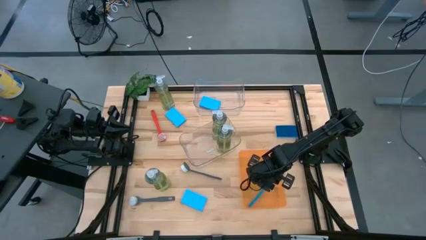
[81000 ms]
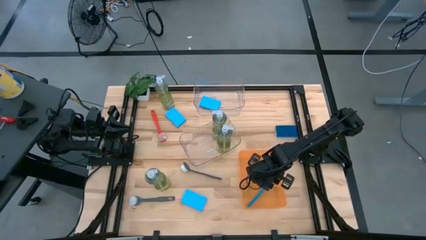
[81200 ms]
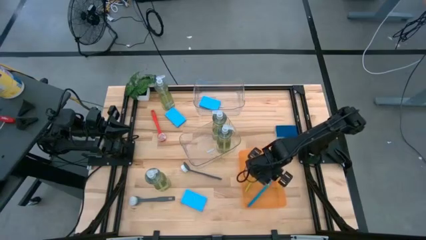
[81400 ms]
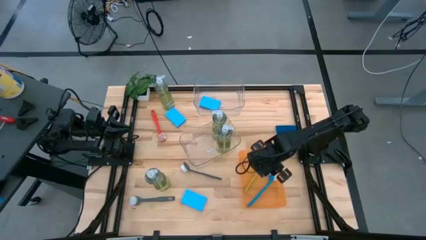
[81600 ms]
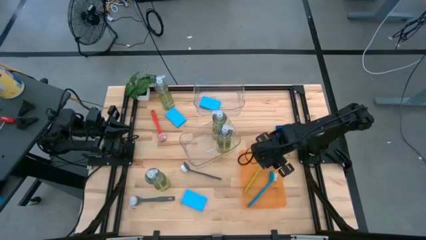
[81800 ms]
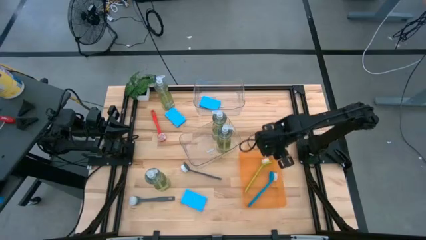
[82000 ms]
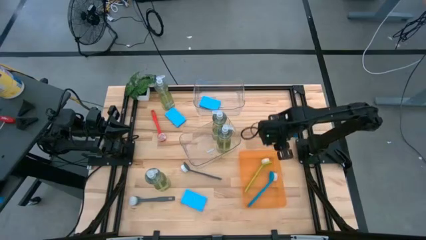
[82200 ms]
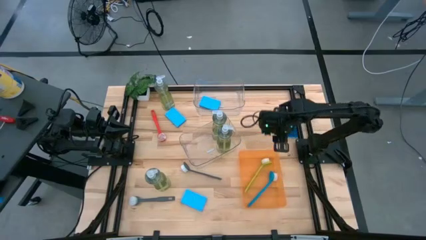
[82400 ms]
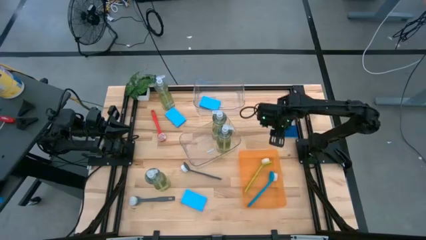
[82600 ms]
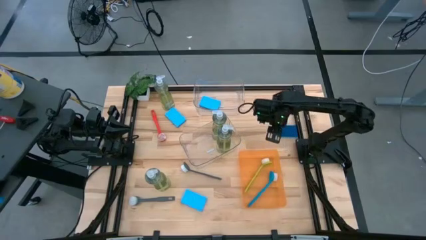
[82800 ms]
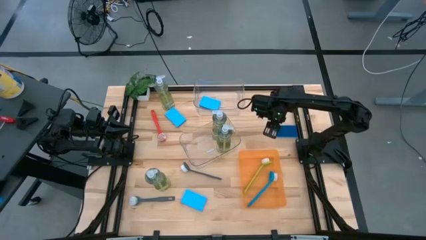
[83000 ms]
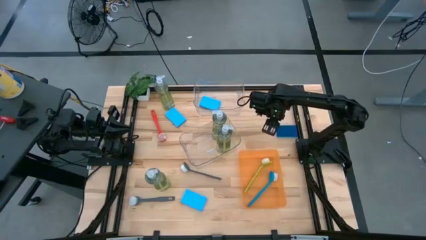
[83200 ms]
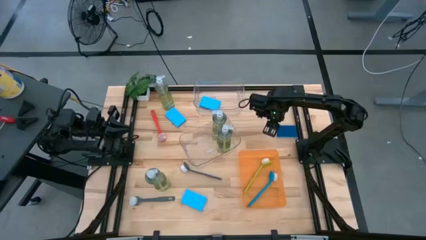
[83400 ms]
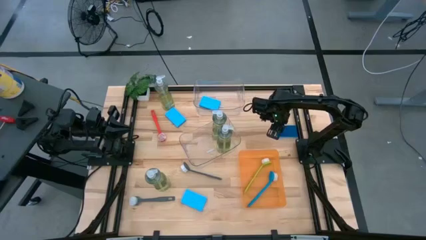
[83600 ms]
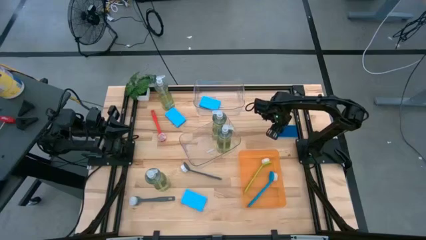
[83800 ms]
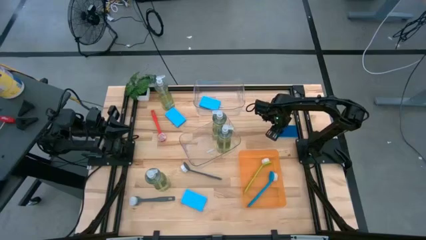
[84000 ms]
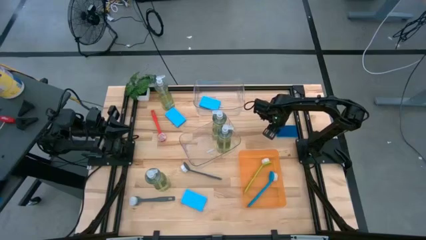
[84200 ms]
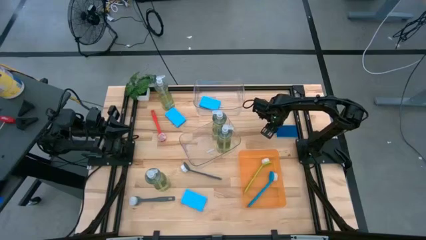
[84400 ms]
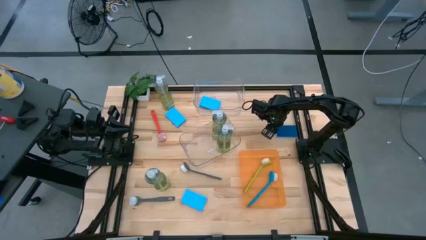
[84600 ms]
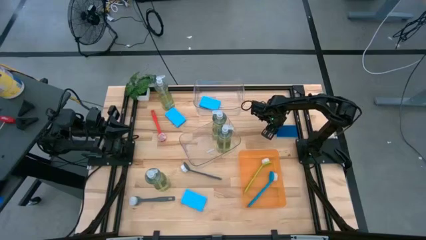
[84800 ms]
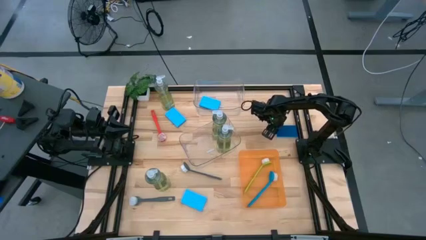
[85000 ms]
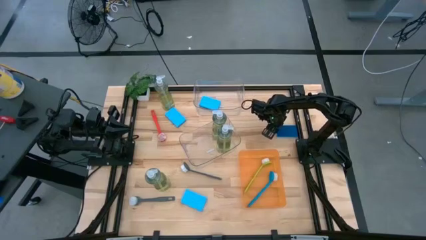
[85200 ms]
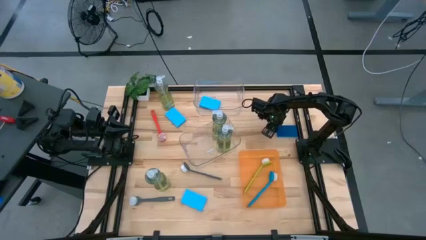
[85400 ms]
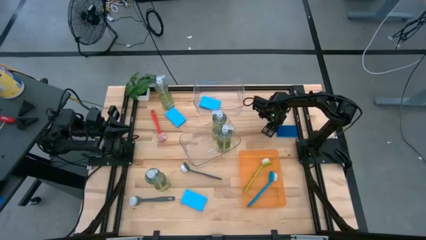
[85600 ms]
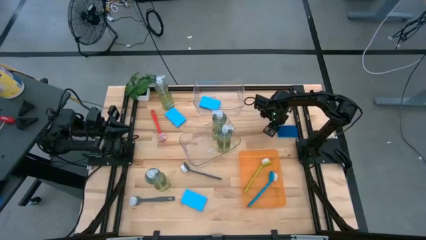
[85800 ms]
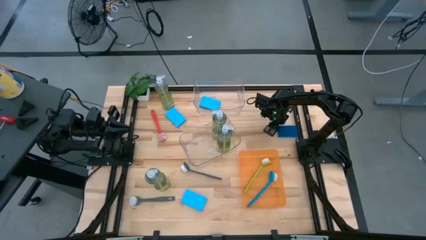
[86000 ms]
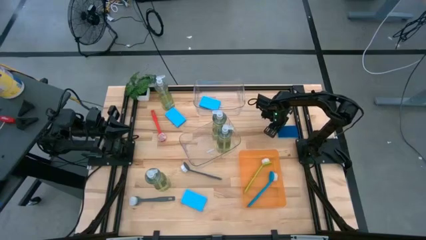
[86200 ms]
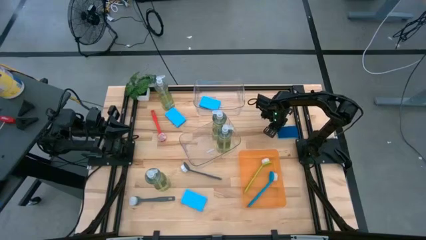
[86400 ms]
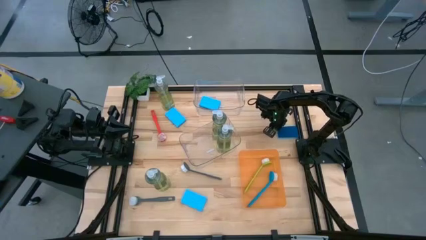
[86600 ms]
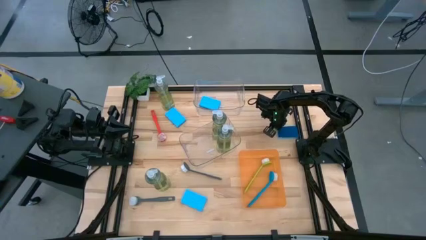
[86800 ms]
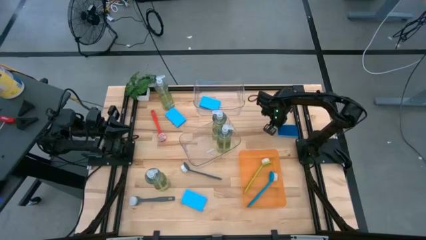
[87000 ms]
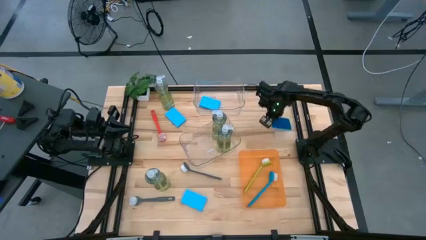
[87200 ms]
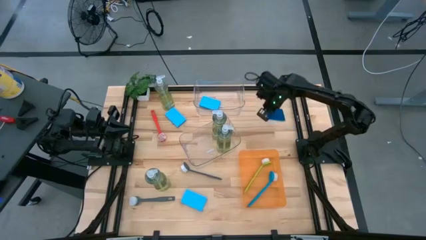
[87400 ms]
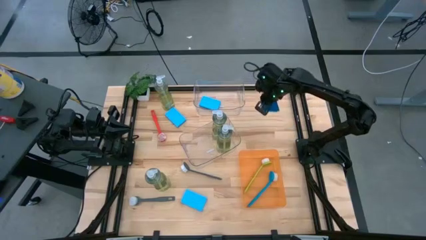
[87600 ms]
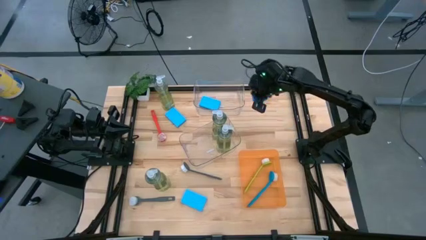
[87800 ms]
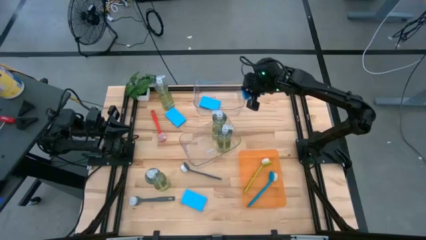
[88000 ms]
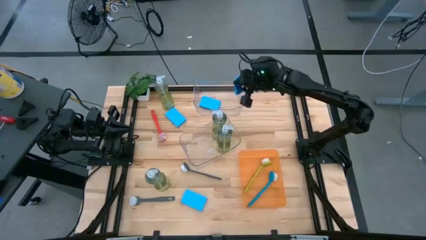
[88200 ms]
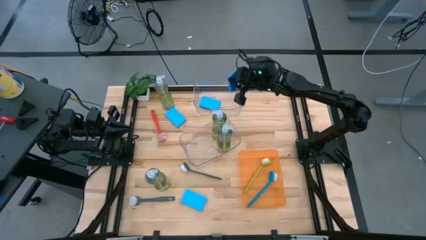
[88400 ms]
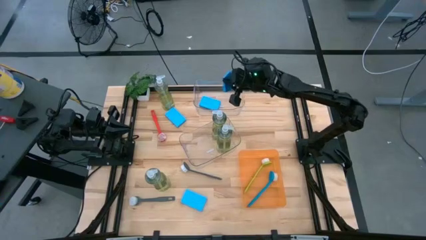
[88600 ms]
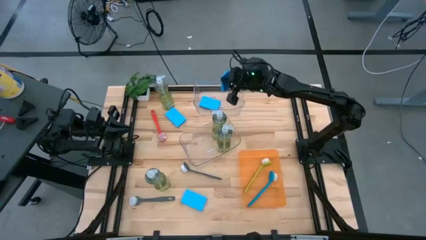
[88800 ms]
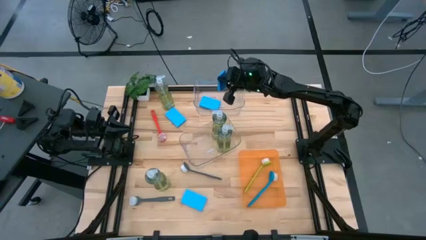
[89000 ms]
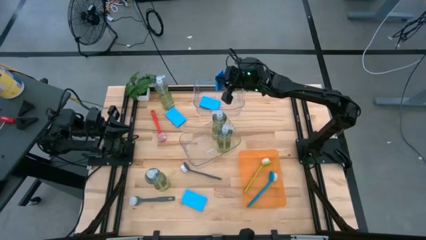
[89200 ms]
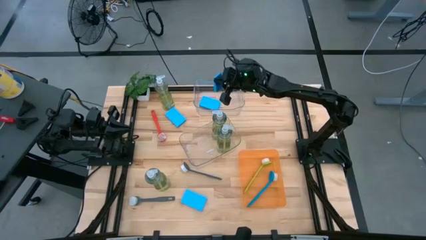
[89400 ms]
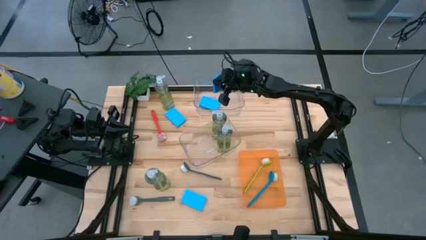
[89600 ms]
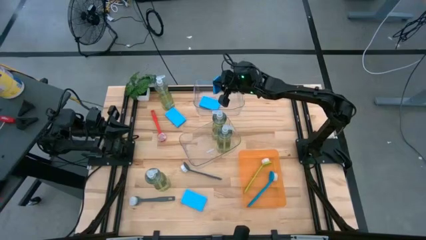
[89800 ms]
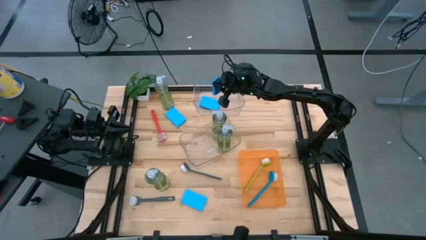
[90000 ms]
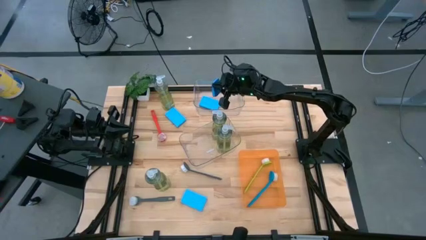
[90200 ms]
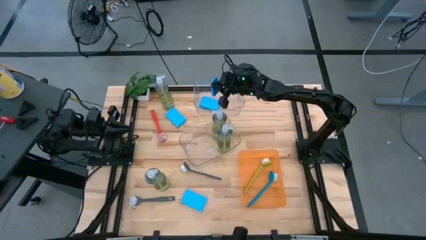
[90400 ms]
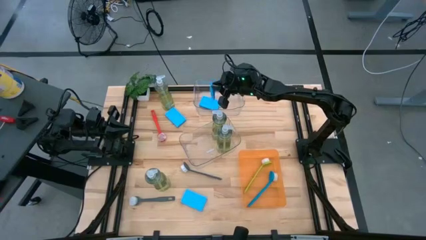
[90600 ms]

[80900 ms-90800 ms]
Task: Pick & Place Kitchen Sink Supplies
Put the blue sponge into the top transparent bin

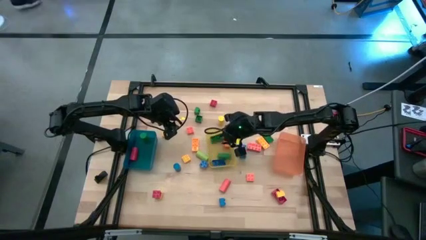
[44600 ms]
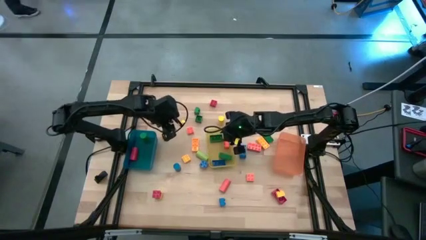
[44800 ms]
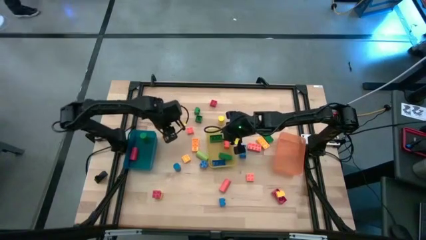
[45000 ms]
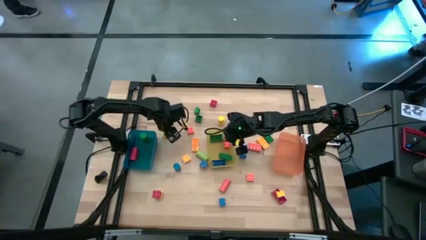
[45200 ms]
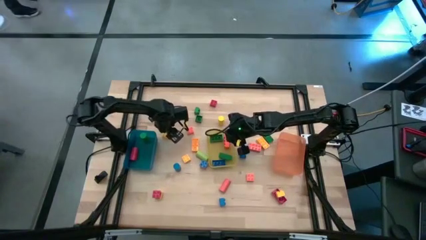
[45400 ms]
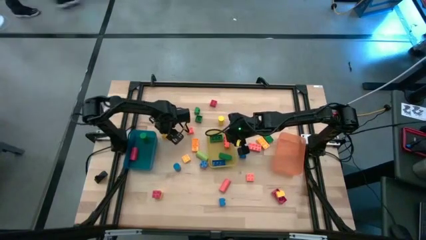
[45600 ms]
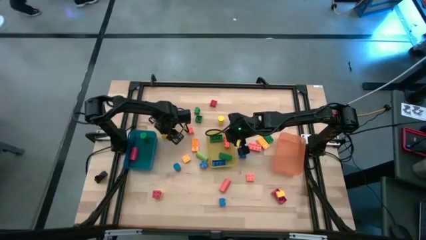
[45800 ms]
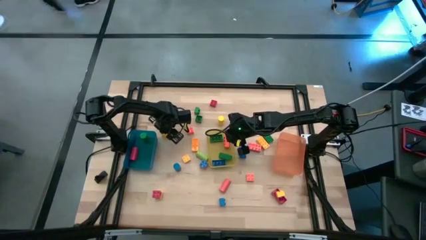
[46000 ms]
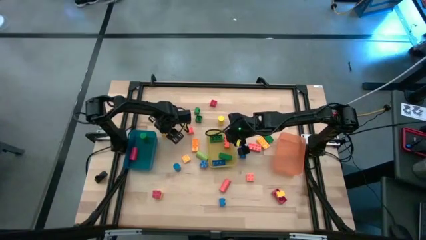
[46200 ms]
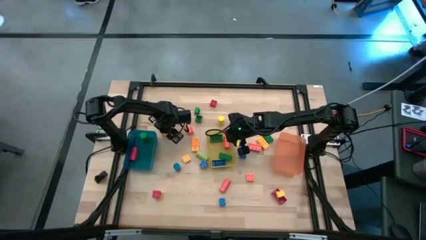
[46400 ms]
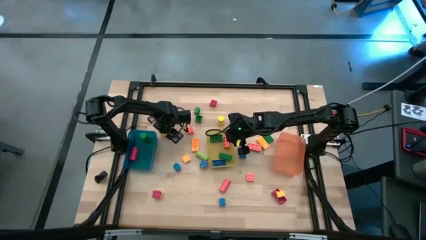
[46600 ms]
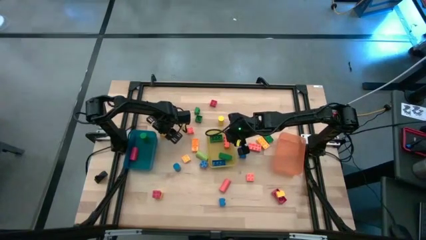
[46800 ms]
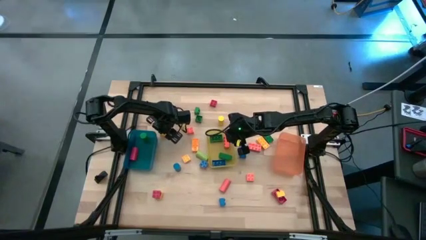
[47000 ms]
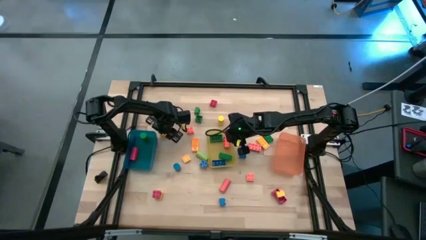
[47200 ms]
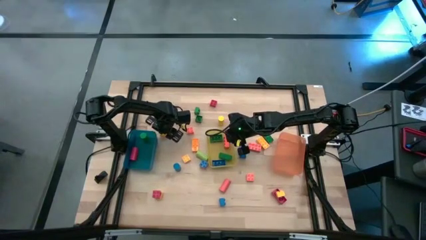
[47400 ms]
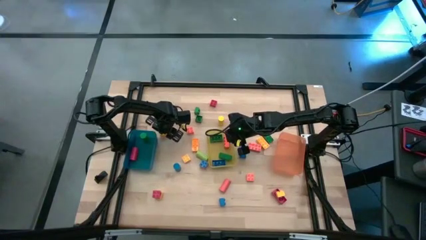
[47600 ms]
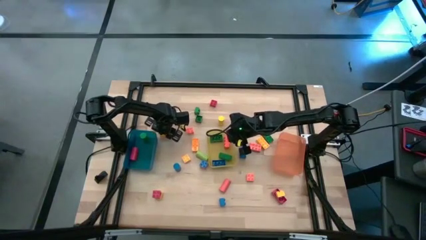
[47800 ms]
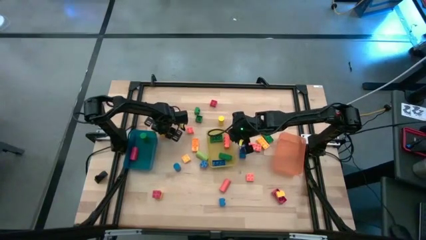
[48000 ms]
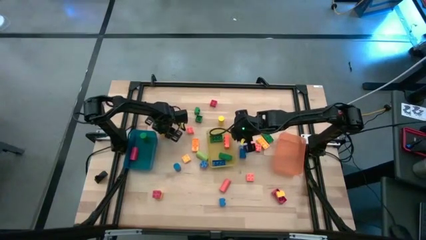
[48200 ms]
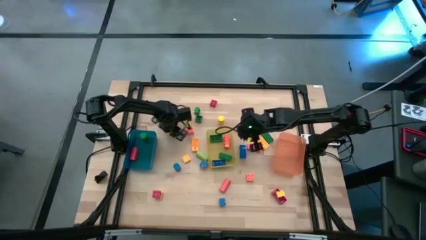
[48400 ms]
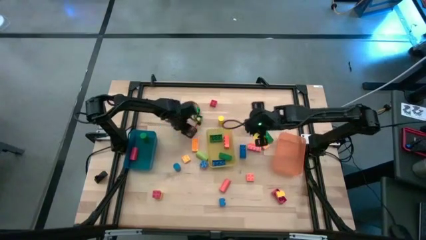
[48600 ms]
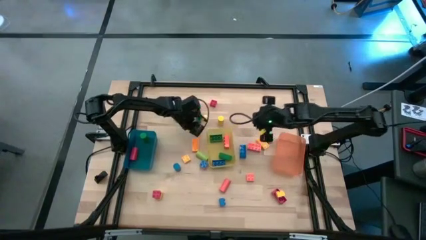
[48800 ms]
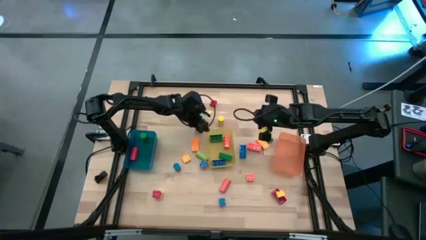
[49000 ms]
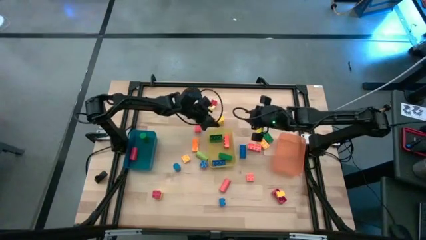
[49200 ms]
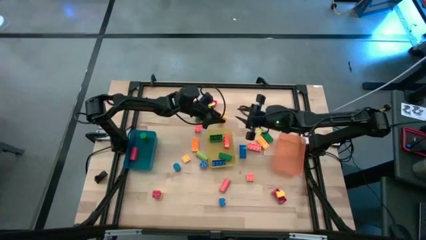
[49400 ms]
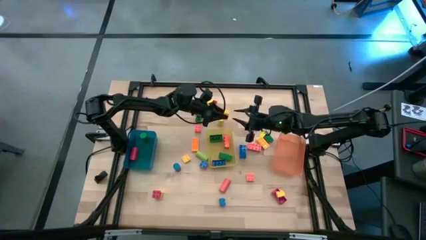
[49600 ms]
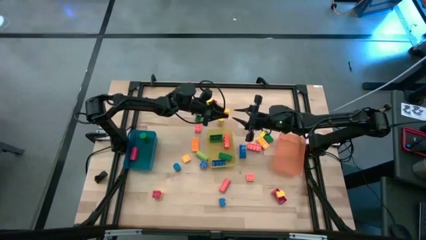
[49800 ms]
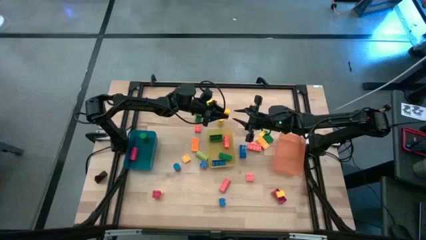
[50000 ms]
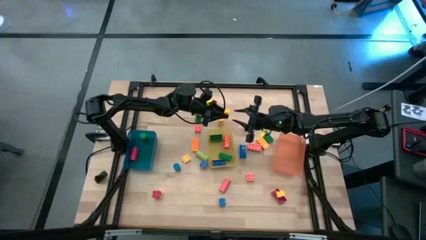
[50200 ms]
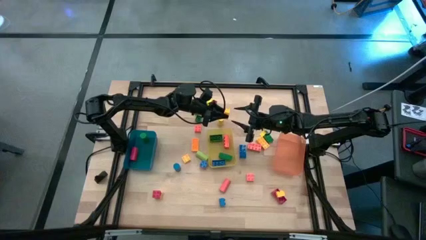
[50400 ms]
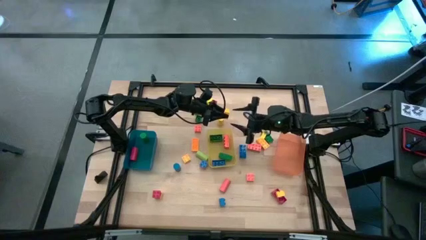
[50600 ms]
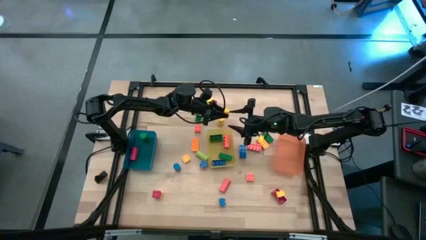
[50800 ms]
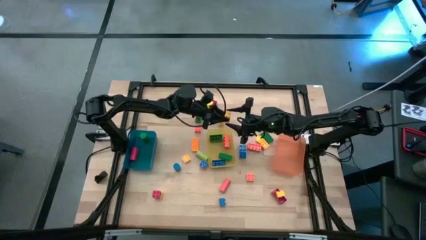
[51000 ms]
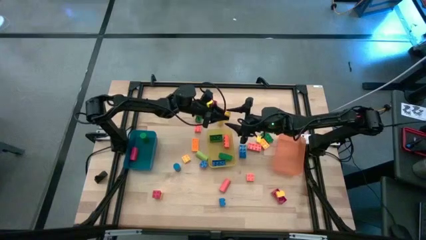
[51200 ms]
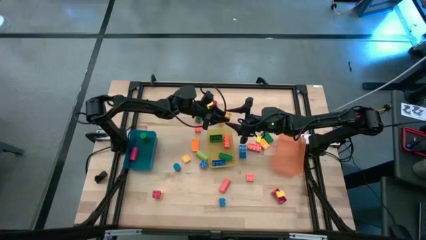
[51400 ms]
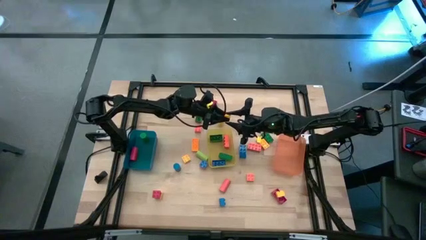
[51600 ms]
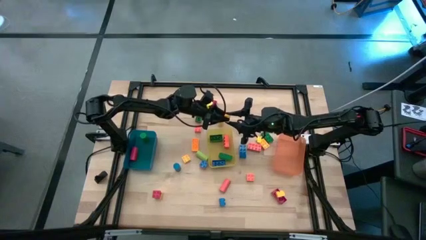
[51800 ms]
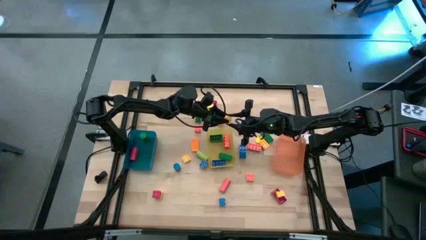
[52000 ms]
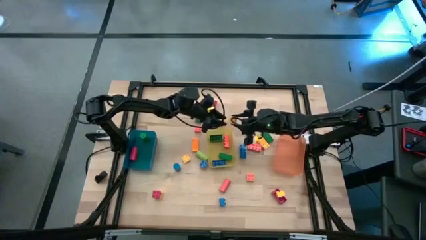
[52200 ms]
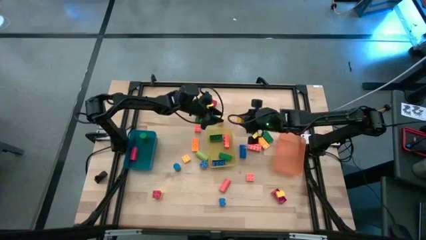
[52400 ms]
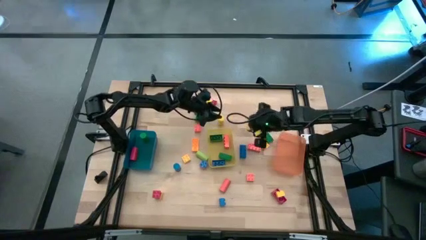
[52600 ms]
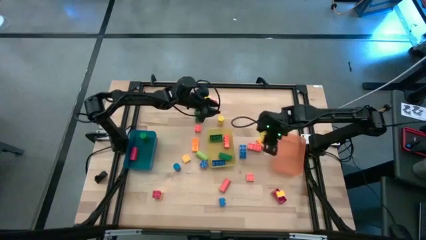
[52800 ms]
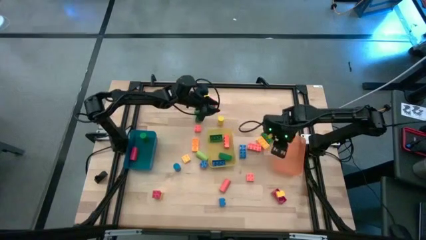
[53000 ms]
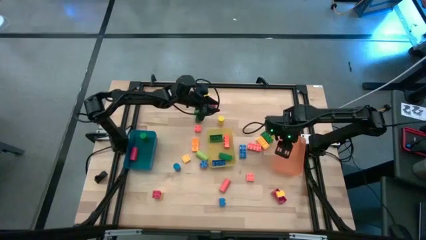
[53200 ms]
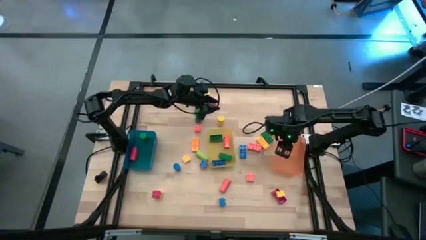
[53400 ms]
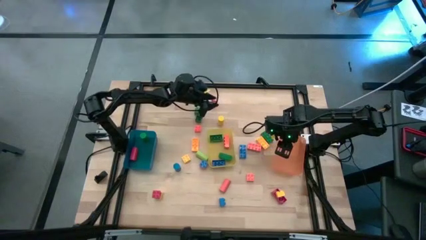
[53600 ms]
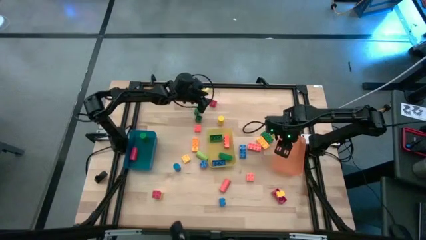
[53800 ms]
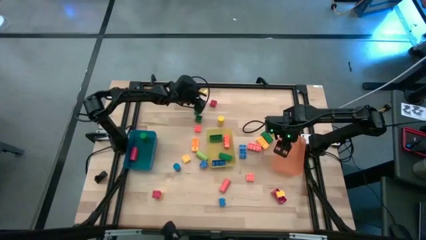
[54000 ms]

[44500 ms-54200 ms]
Task: Sort blocks by size
Put the yellow 4 stud game piece into the orange bin
